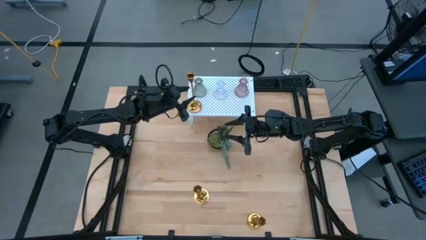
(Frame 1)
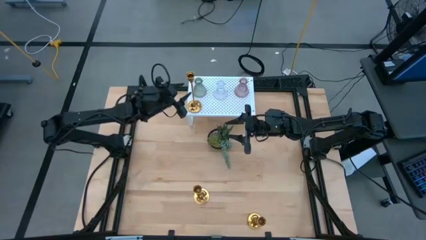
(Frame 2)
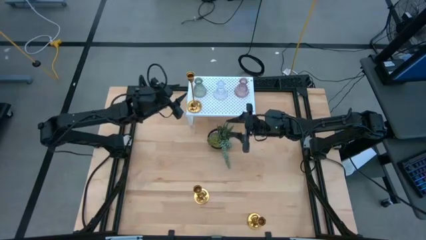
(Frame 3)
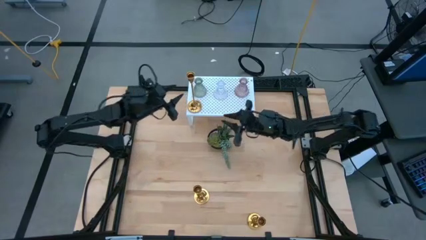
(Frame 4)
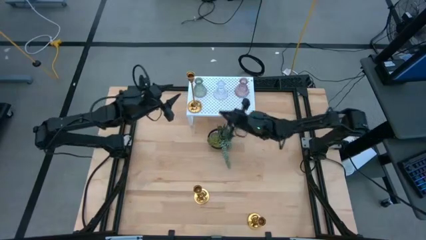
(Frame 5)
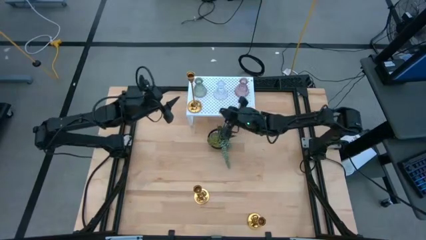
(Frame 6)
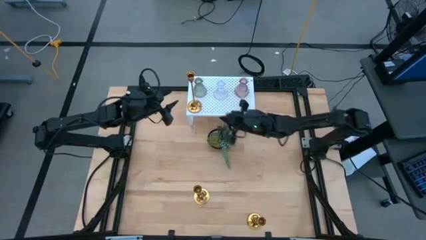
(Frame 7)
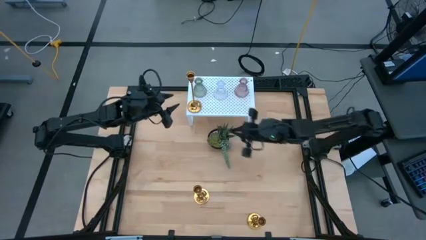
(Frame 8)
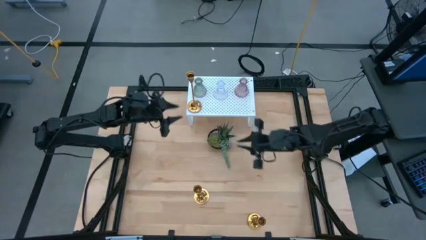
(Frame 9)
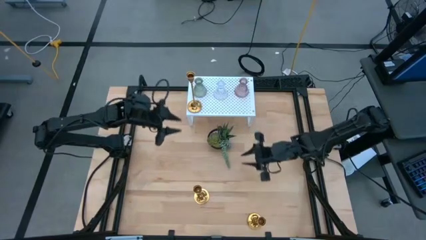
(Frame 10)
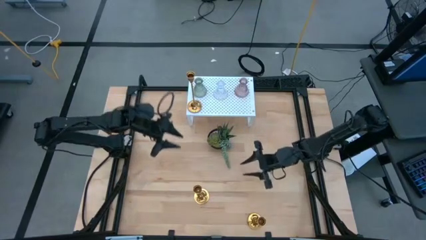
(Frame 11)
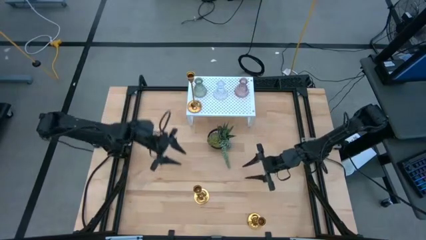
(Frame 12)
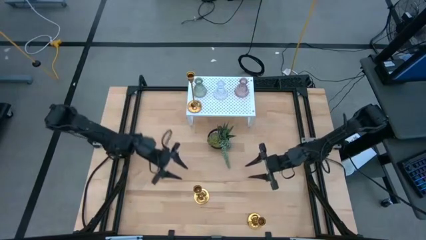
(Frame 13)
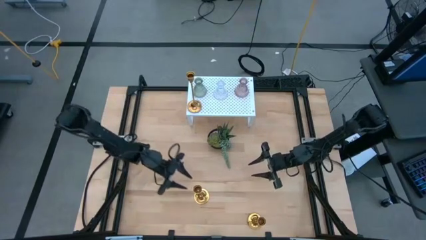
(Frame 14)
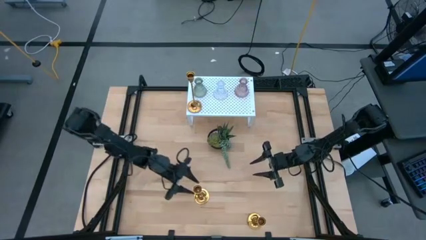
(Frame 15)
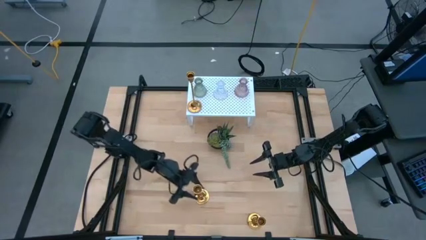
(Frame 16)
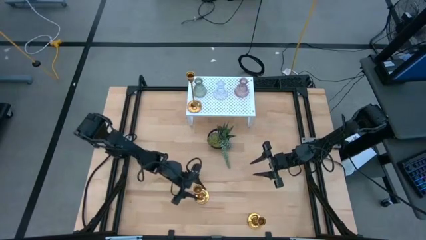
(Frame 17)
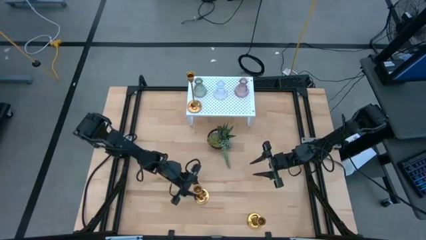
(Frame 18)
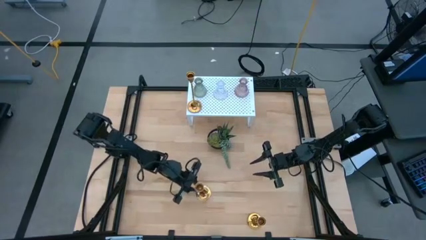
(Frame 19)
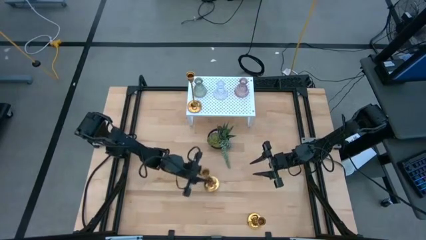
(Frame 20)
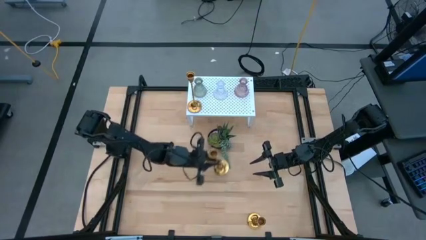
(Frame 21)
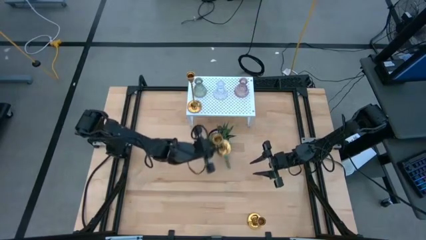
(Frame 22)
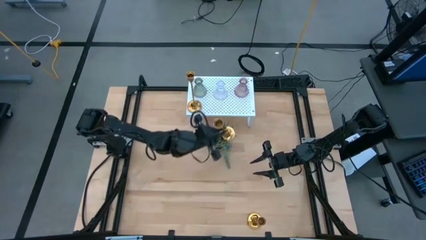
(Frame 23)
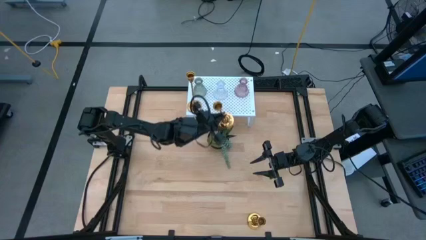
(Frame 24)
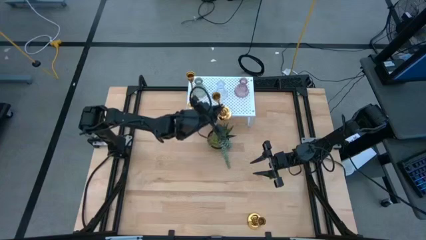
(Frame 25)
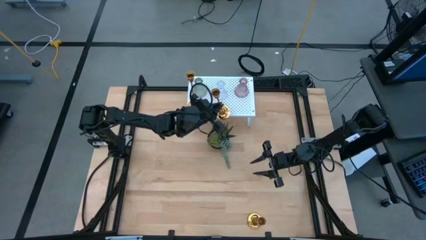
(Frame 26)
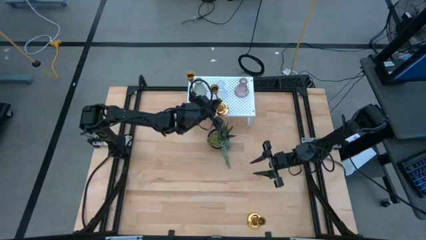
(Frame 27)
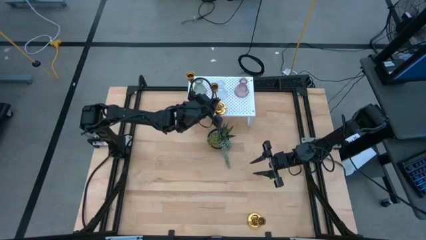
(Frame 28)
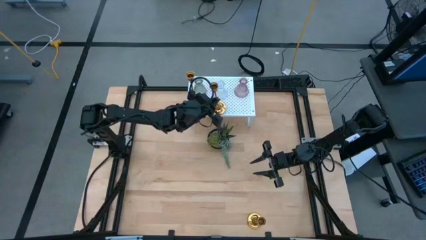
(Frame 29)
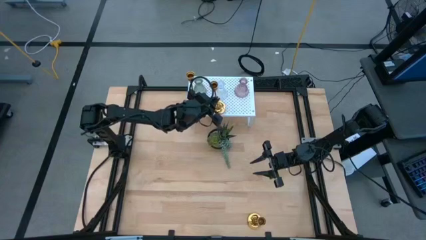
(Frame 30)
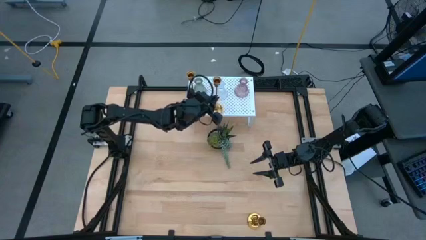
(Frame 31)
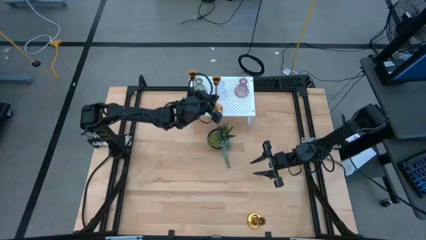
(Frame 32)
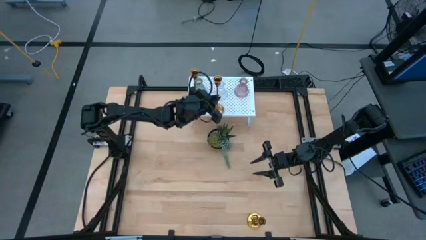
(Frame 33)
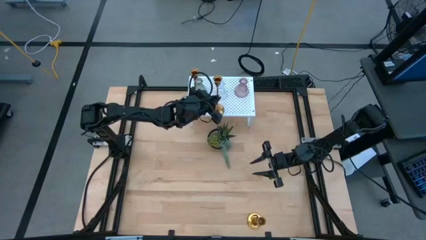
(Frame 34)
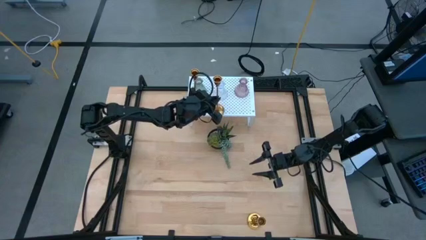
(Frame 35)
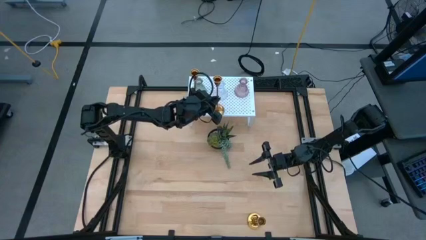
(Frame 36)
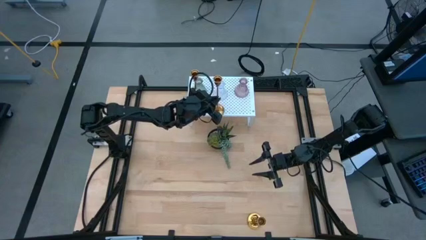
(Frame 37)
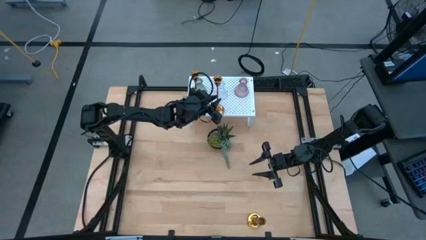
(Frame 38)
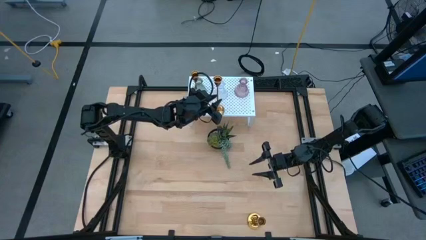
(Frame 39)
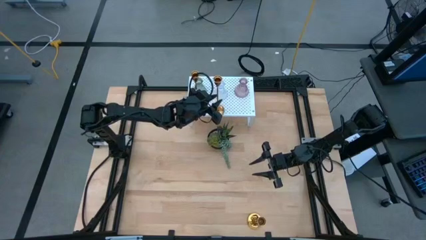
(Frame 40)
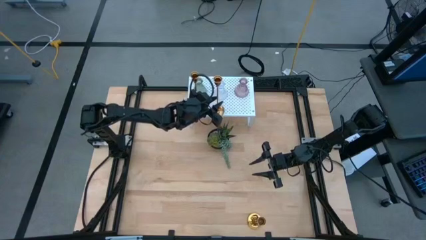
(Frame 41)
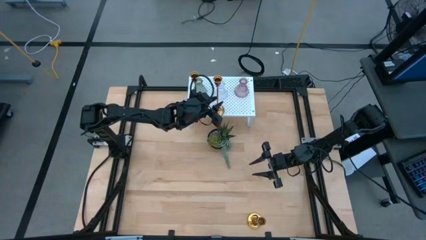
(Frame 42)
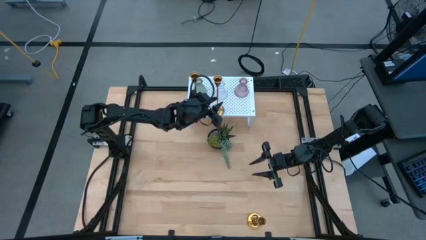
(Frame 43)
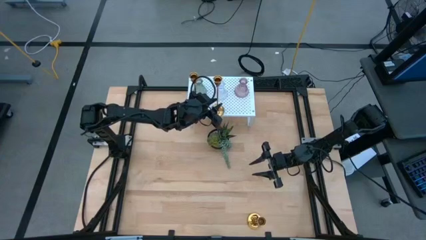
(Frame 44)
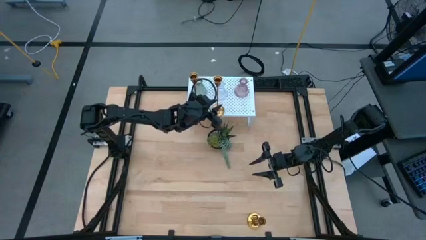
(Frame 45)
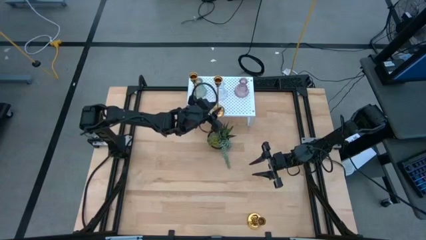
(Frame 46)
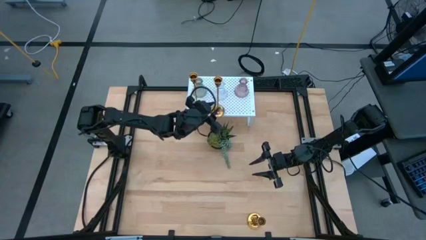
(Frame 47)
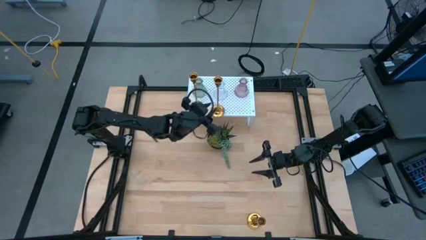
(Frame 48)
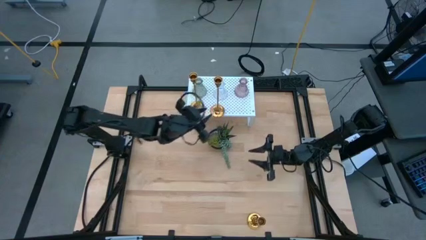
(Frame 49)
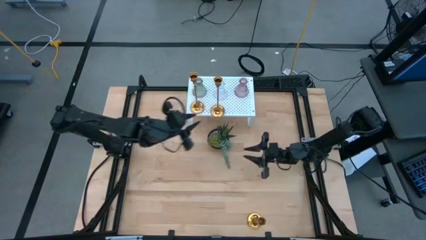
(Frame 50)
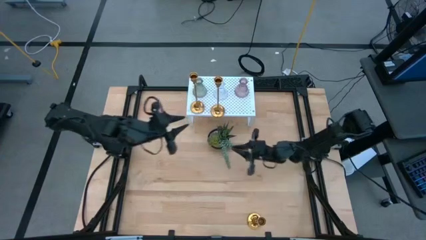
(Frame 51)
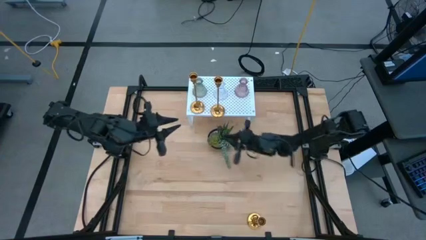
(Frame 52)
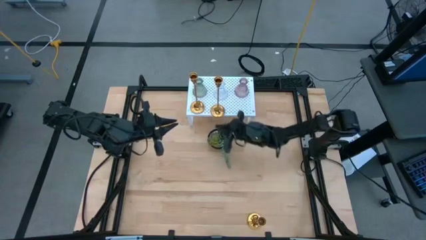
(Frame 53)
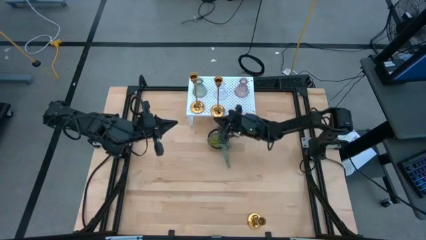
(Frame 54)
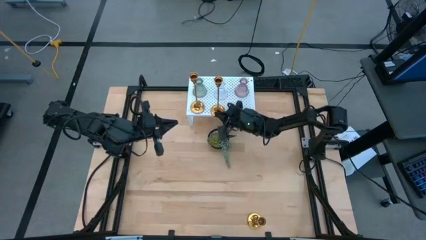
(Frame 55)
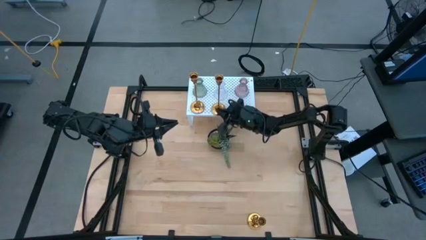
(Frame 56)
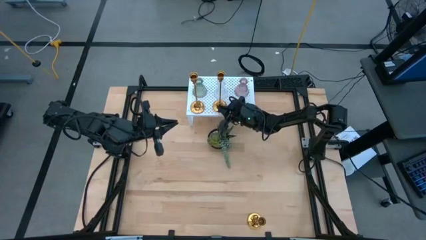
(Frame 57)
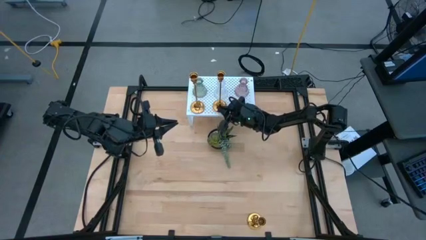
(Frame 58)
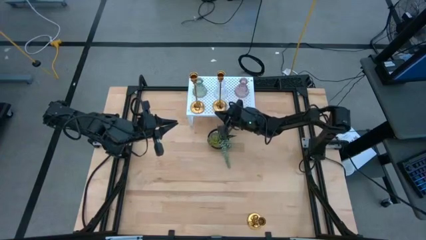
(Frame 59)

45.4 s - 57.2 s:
Task: Pick & Place candle stick holders
Put the top golden candle holder on the shelf aligned with the transparent glass candle holder

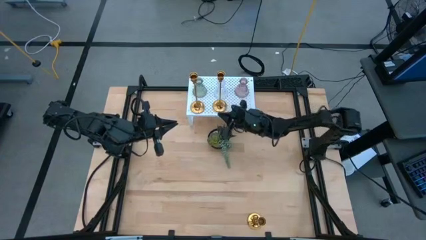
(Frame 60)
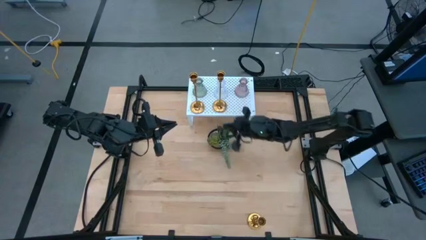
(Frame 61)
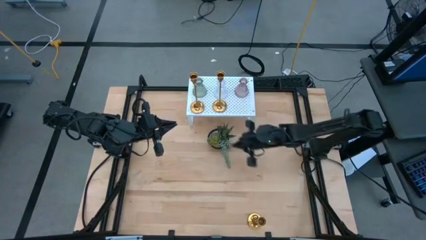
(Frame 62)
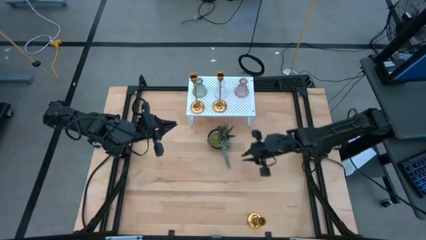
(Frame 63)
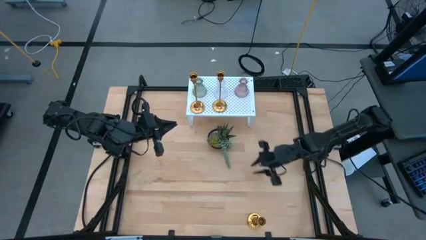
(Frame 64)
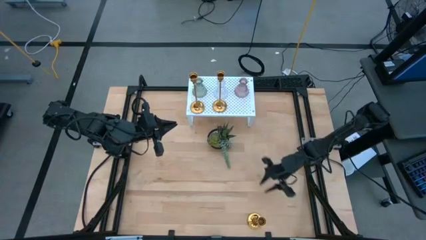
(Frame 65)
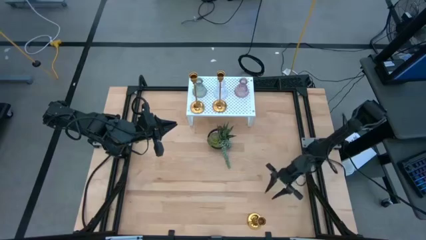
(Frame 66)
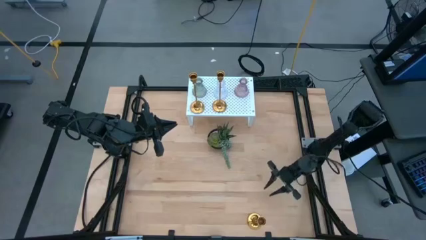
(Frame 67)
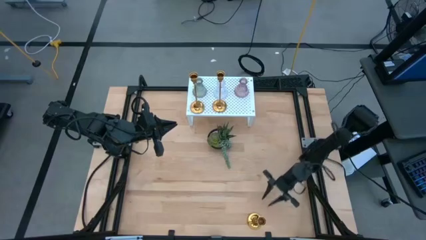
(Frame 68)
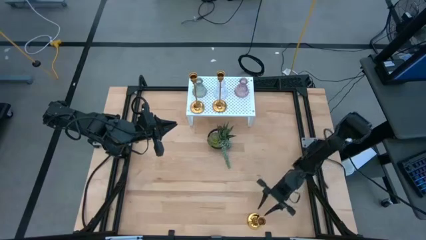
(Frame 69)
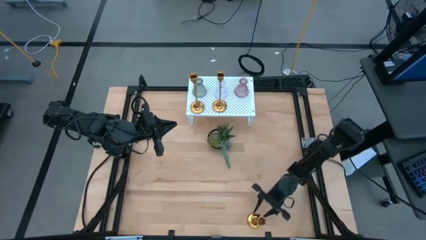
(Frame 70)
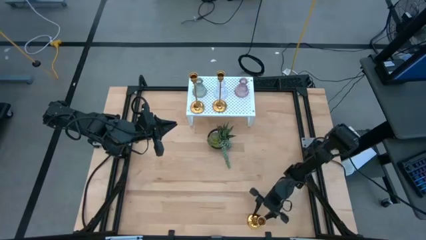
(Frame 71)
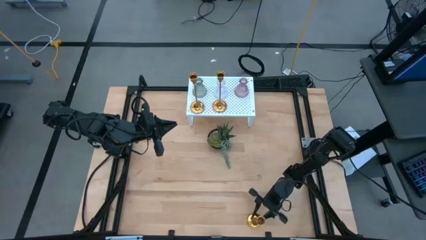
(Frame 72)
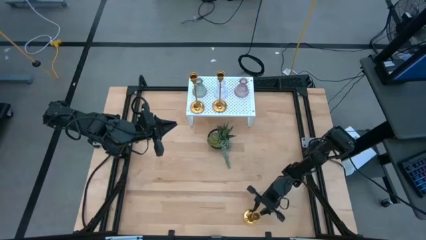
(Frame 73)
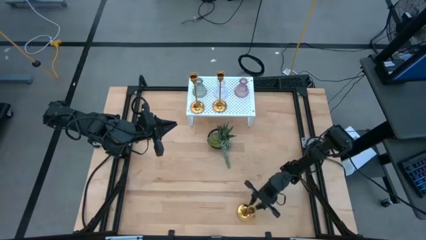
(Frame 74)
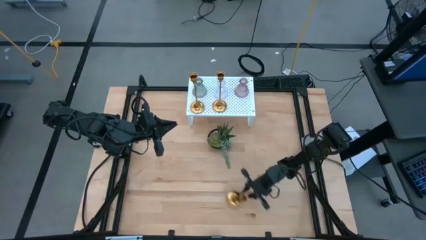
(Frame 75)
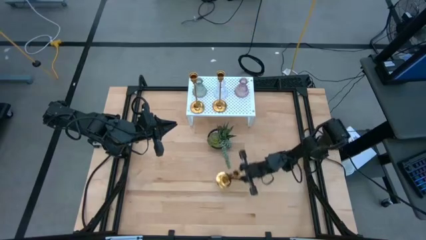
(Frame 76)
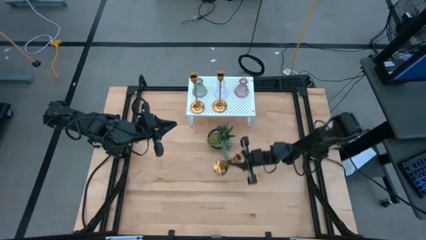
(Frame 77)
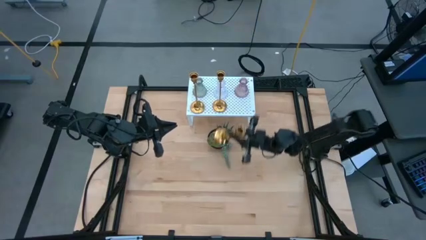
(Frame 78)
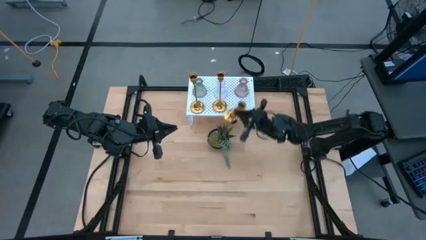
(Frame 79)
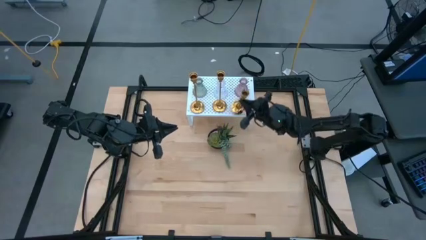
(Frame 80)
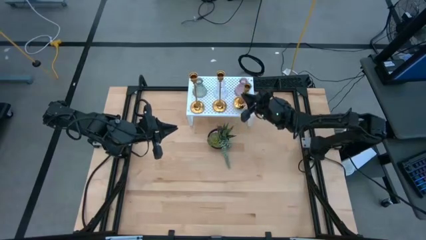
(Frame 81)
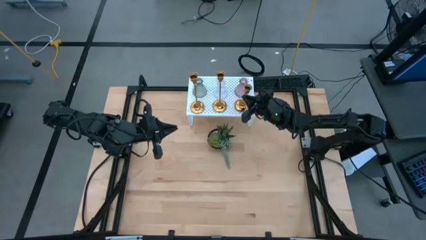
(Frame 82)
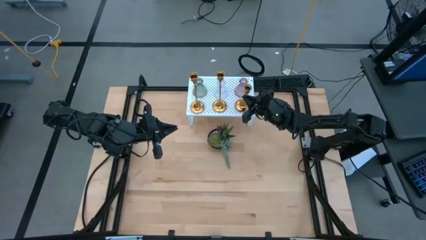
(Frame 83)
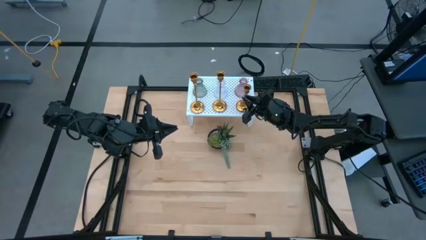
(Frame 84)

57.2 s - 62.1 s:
Put the golden candle holder on the shelf aligned with the pink glass candle holder
